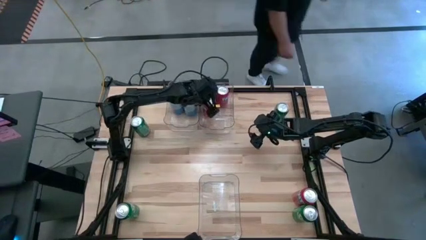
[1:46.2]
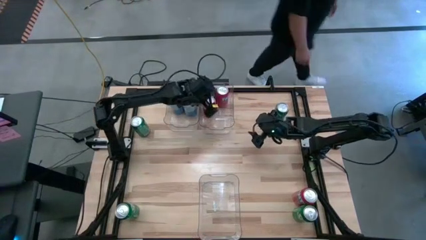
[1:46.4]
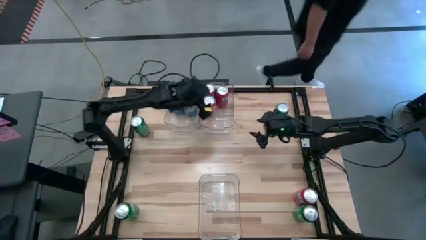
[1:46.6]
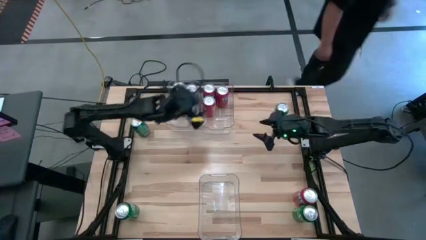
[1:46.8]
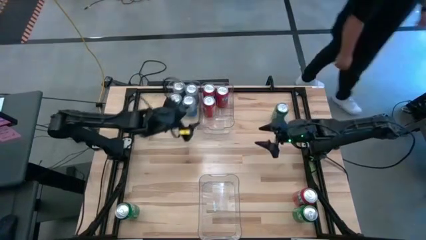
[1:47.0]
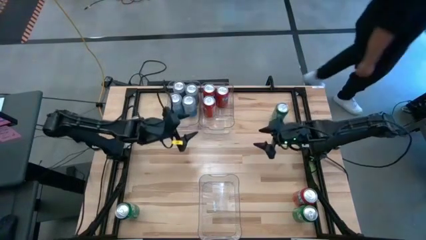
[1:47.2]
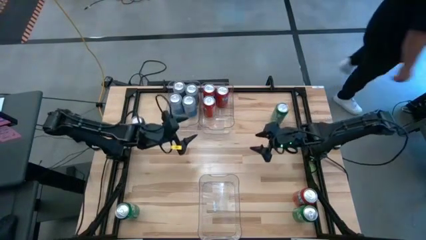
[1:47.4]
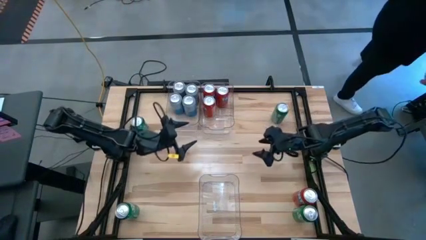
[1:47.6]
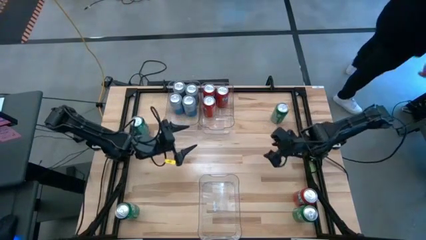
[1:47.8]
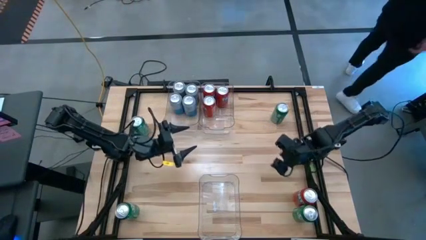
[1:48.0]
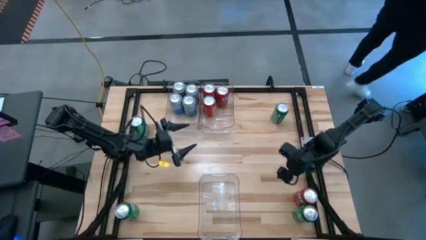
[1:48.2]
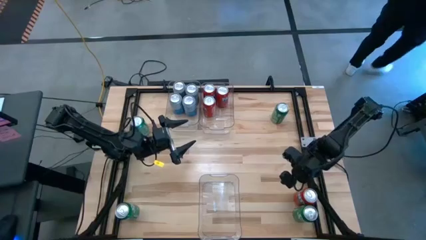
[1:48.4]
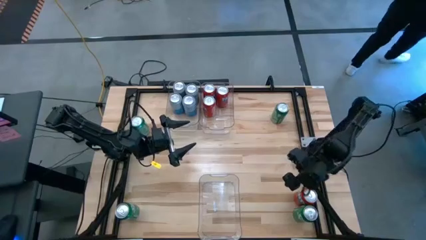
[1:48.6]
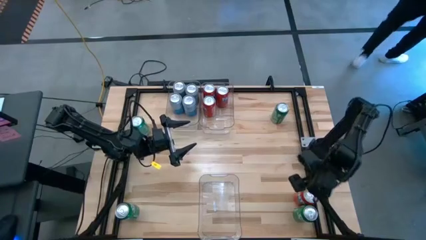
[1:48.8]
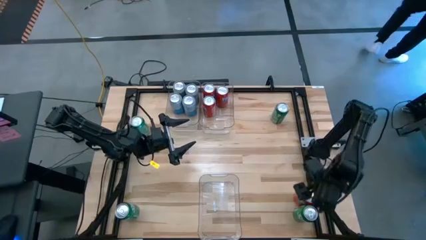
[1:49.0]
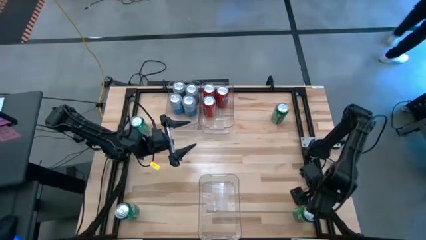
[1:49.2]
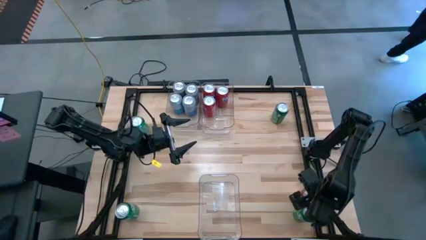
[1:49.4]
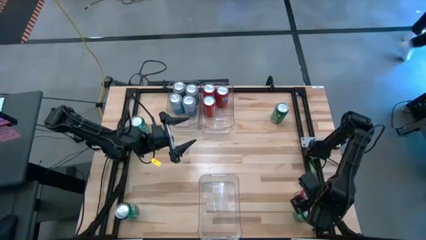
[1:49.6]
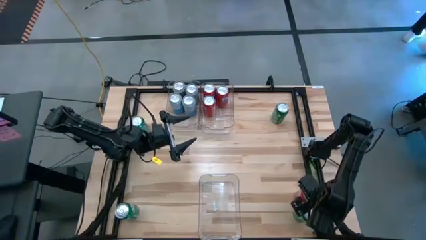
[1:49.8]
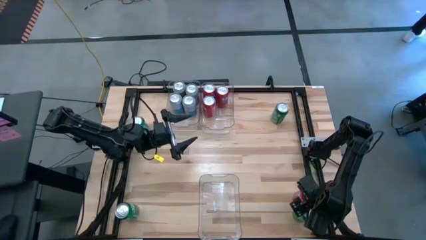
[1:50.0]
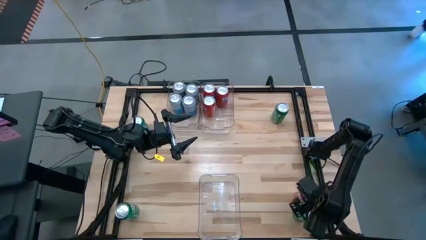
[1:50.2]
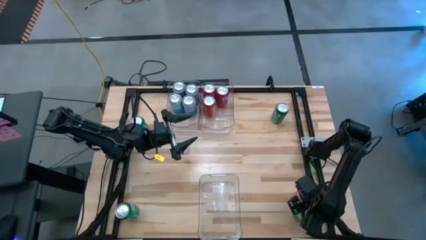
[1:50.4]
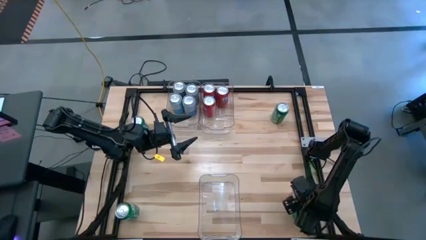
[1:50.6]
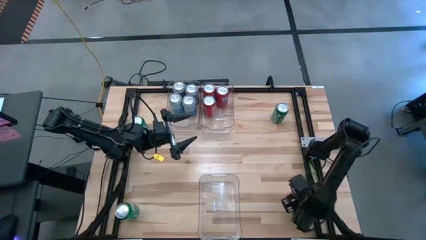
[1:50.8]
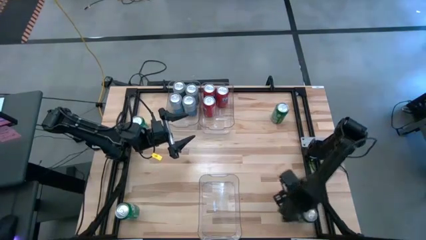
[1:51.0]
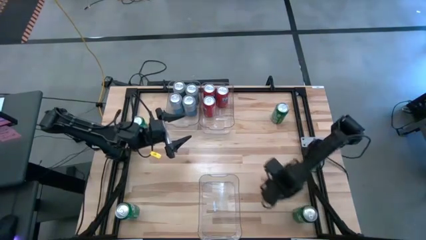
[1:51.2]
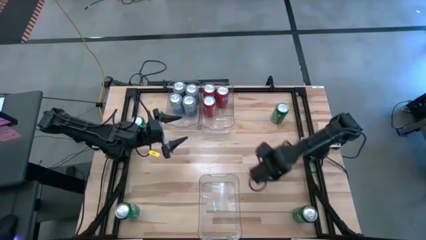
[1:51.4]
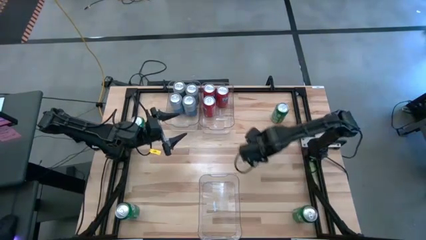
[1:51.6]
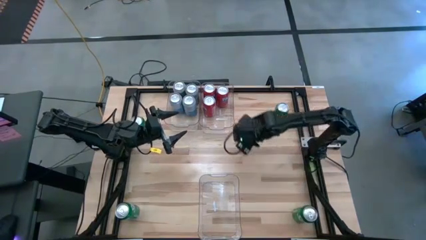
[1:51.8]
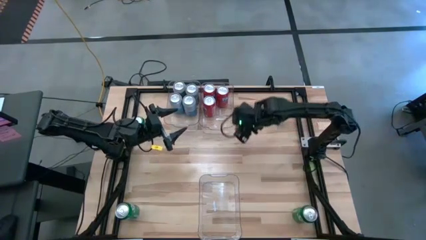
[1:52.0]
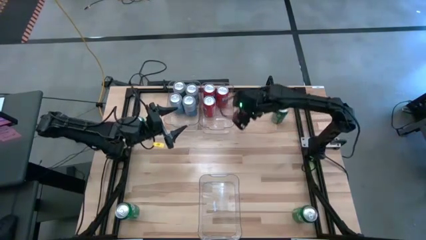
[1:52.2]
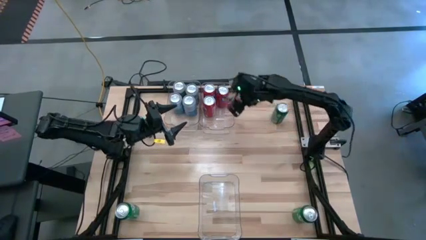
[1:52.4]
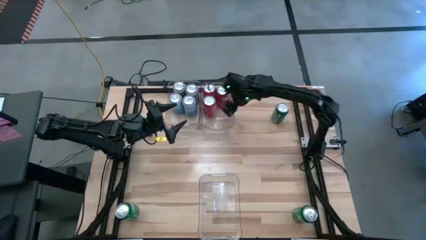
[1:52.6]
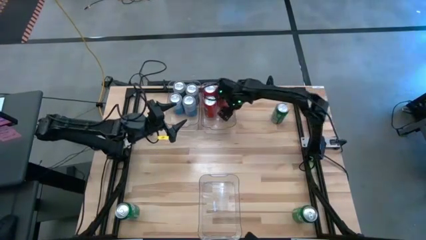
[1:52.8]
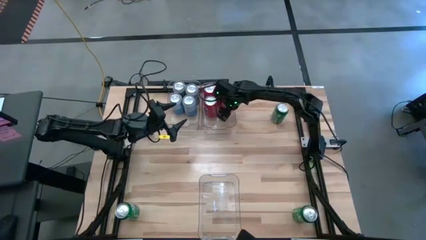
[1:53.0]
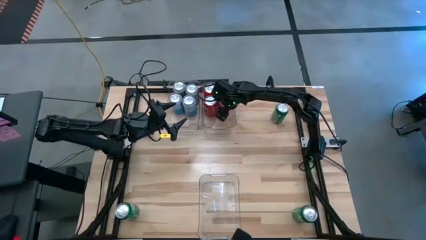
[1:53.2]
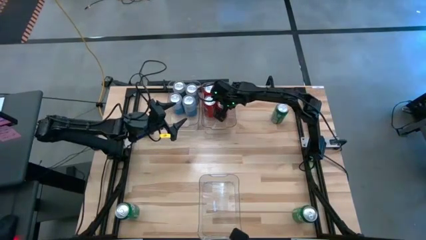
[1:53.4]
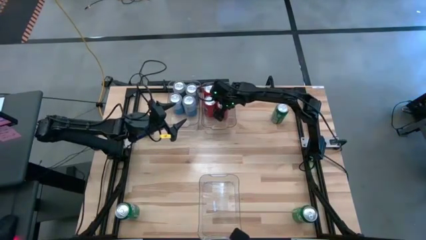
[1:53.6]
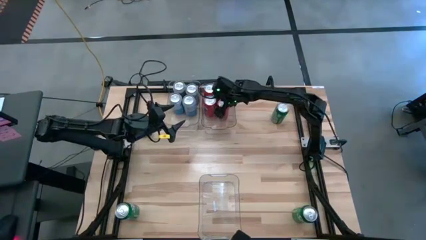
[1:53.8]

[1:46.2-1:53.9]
Task: Sort soda cans
Put the red soda can into the top right transparent bin

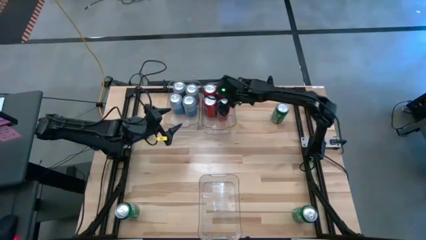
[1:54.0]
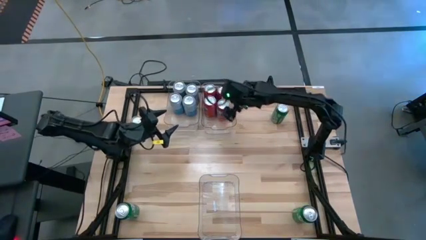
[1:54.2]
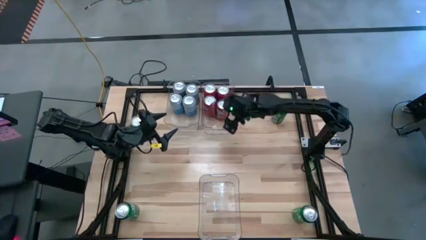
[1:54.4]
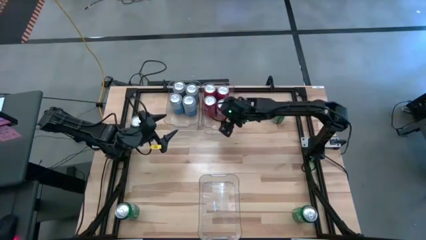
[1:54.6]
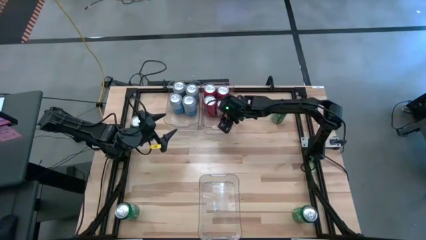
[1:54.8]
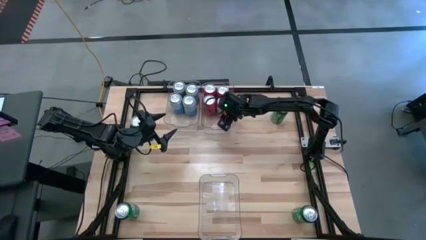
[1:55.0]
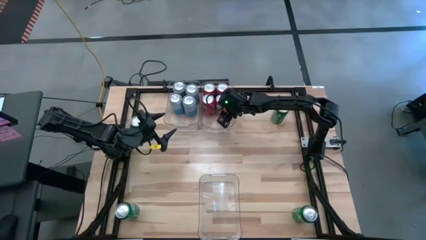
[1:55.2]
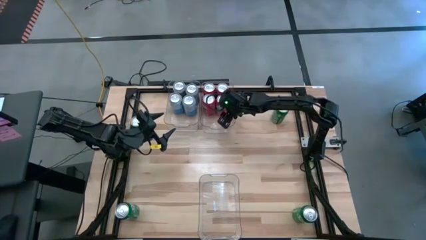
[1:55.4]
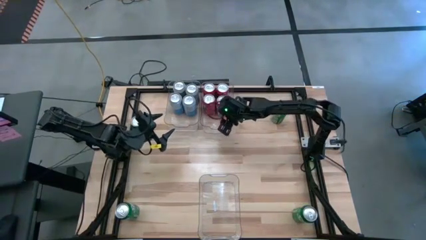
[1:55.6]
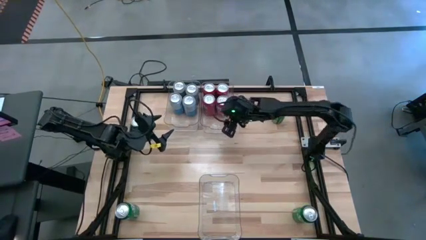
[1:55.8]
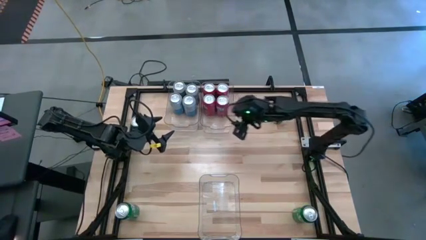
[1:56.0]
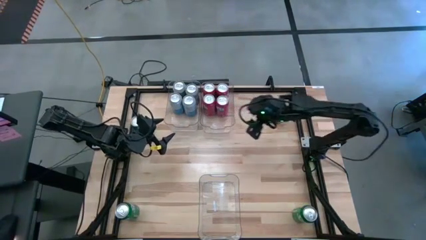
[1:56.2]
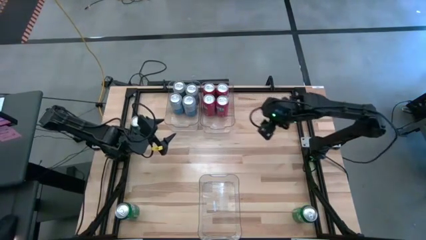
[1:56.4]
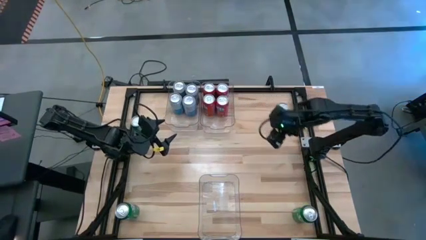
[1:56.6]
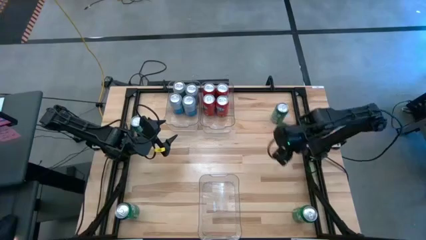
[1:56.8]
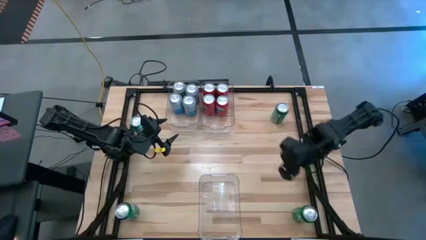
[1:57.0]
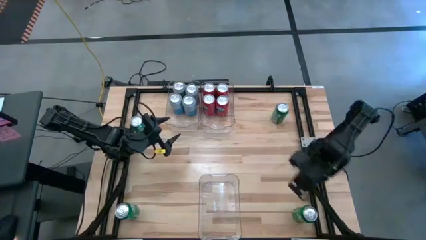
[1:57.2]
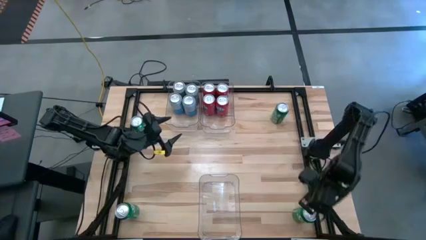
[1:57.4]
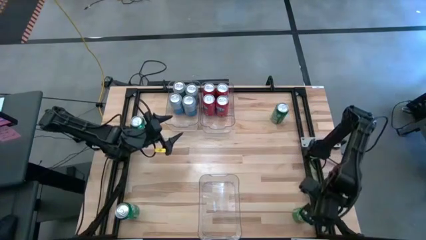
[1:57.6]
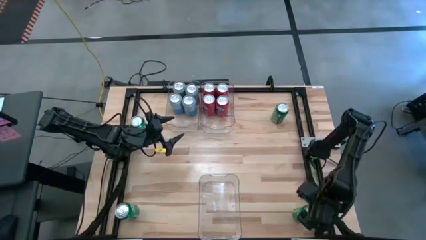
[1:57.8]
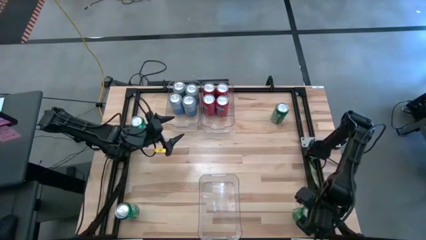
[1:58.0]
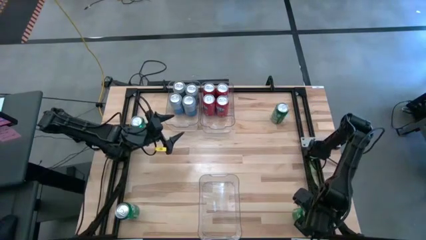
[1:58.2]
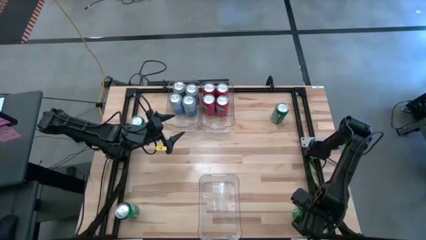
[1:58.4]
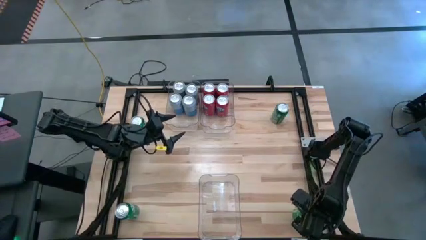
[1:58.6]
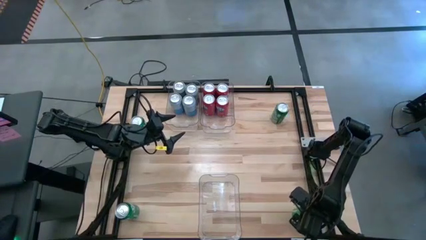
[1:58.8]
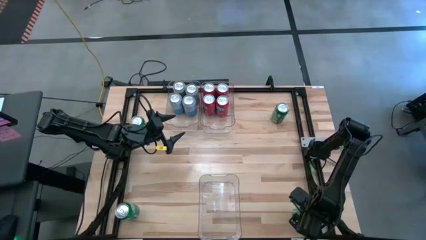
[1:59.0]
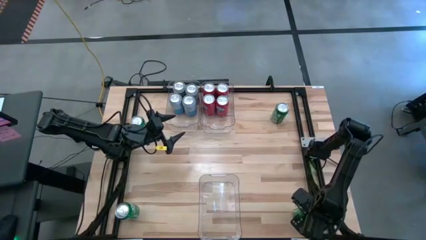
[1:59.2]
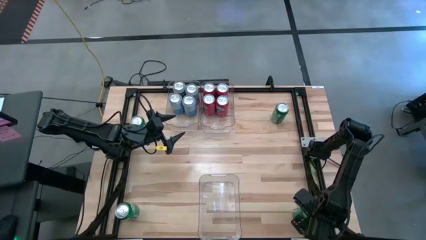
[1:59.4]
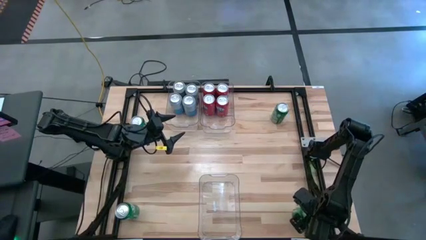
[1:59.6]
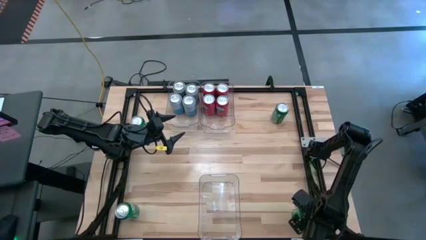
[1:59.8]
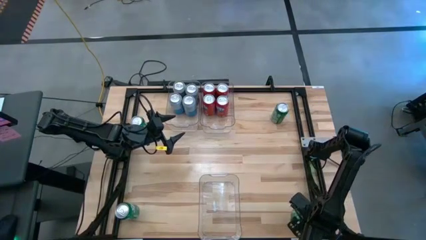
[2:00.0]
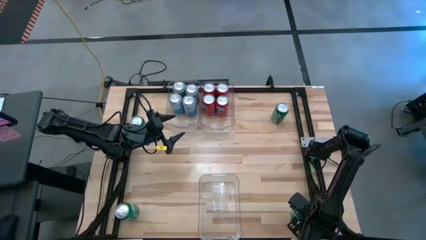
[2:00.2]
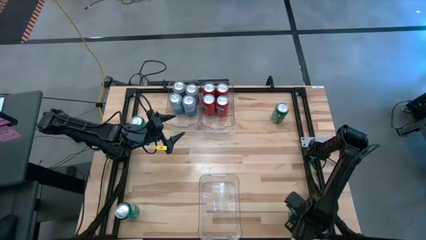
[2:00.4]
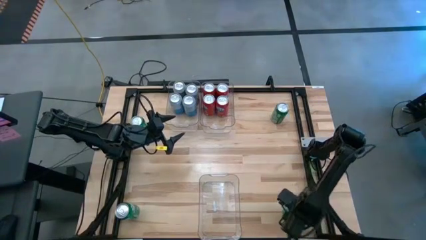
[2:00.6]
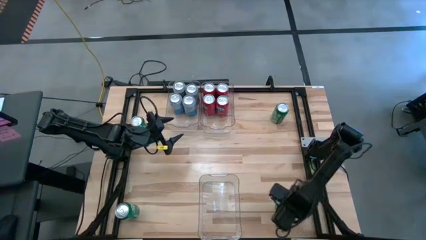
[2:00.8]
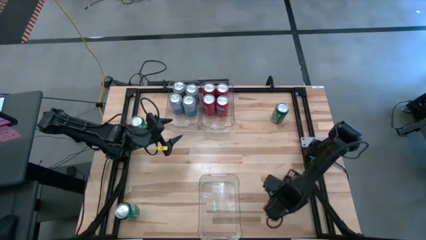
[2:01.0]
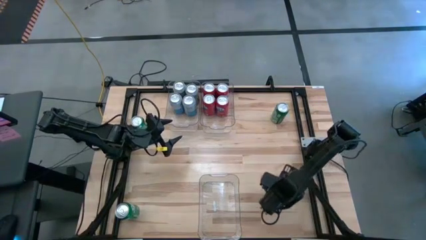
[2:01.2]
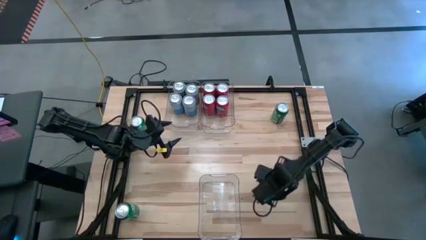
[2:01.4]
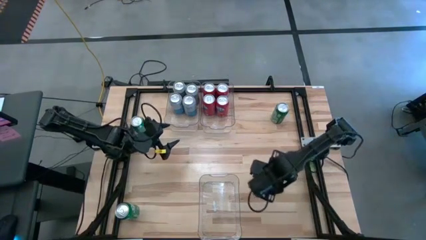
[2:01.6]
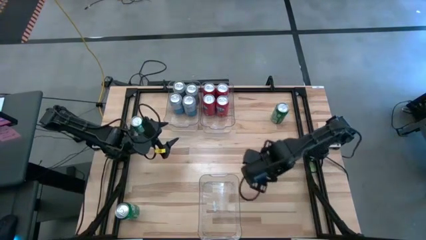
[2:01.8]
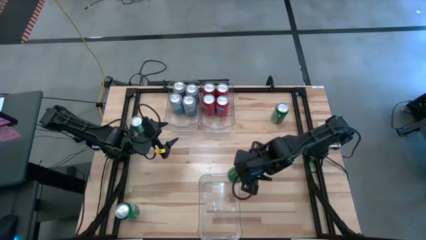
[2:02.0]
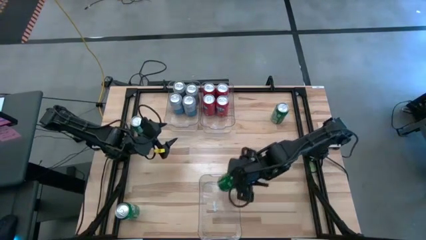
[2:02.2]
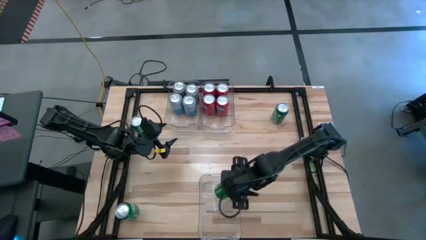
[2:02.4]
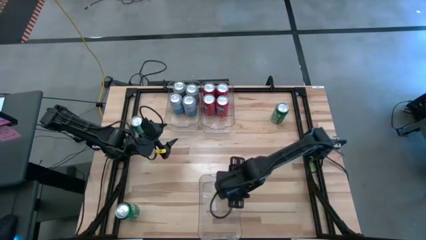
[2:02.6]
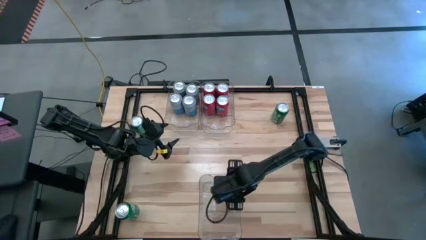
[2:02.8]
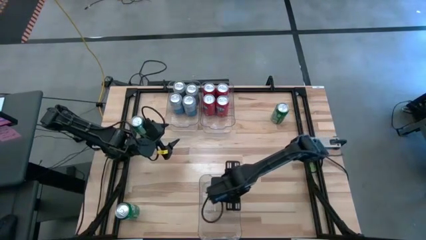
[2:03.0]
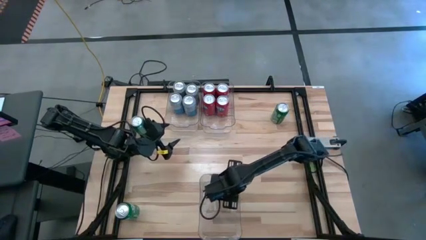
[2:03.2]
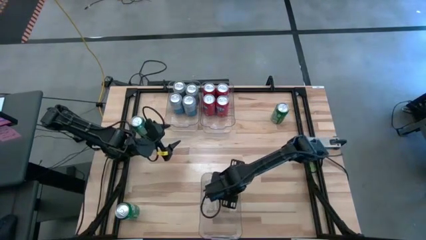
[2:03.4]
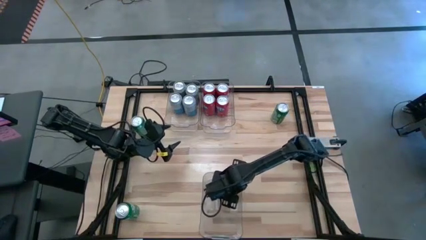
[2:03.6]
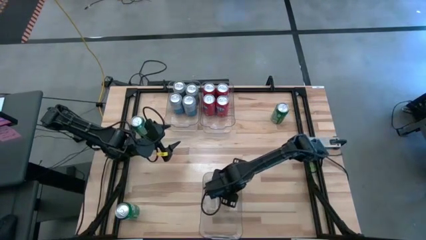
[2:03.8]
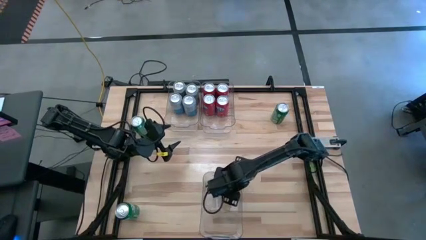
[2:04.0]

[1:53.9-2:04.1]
Put the bottom right green soda can into the bottom transparent bin
